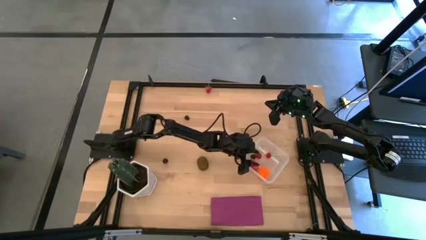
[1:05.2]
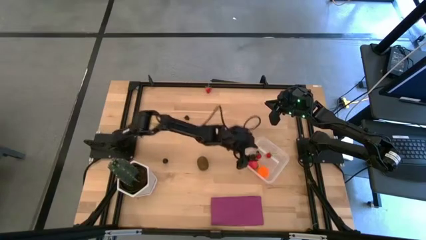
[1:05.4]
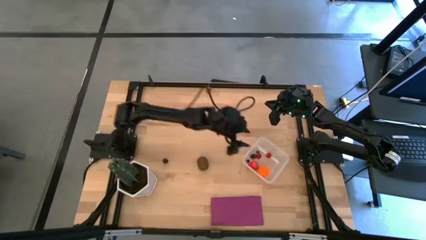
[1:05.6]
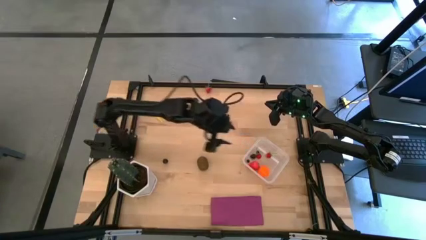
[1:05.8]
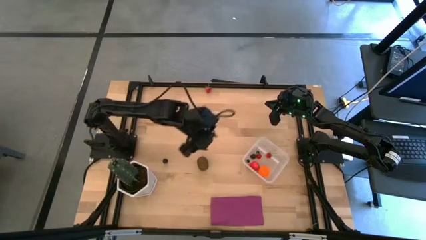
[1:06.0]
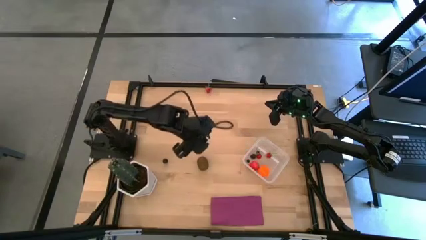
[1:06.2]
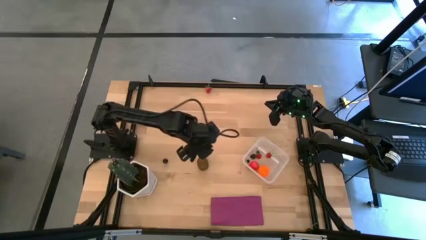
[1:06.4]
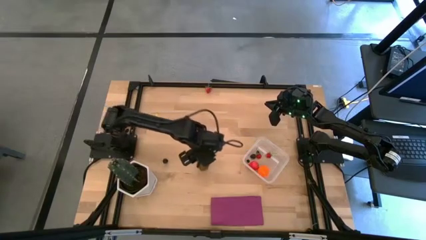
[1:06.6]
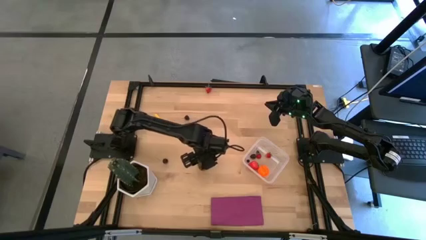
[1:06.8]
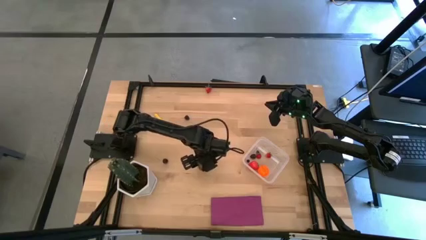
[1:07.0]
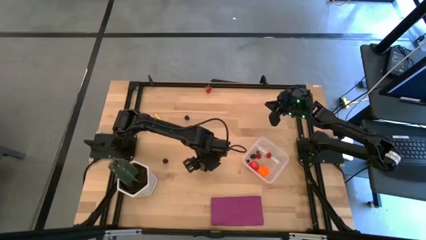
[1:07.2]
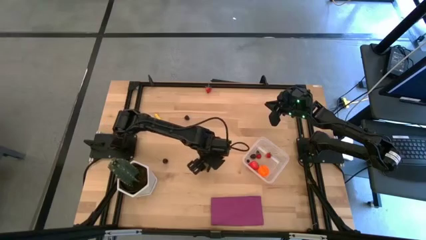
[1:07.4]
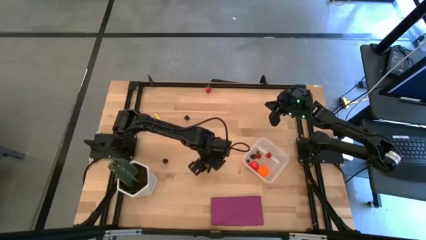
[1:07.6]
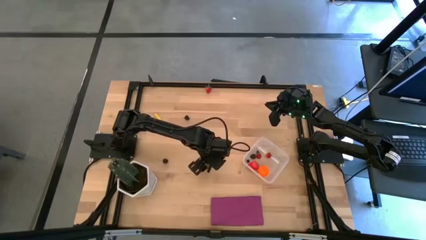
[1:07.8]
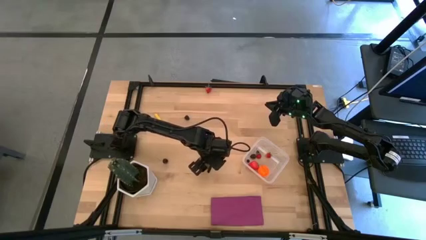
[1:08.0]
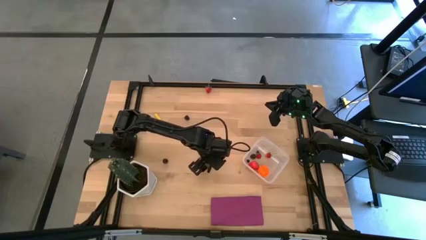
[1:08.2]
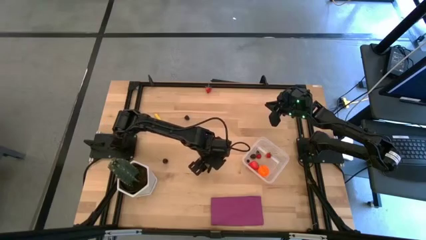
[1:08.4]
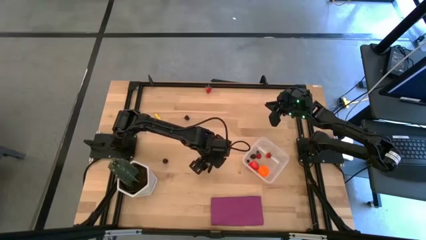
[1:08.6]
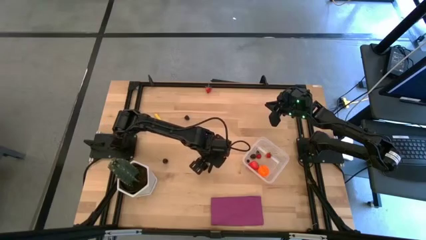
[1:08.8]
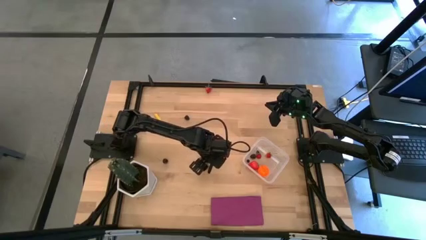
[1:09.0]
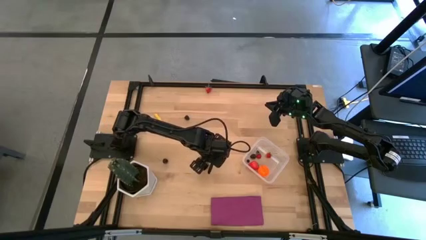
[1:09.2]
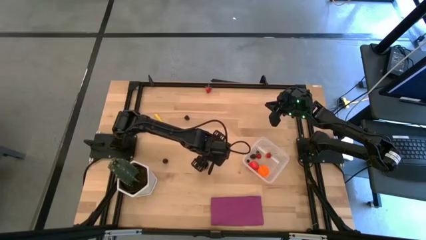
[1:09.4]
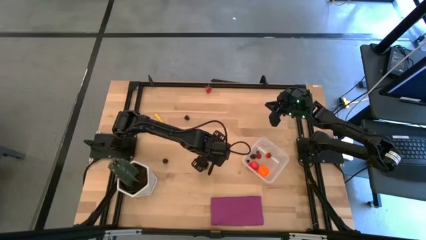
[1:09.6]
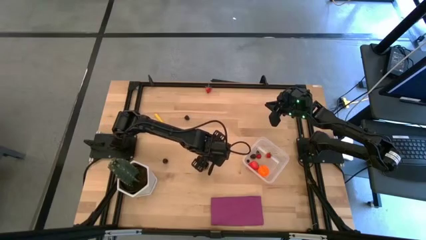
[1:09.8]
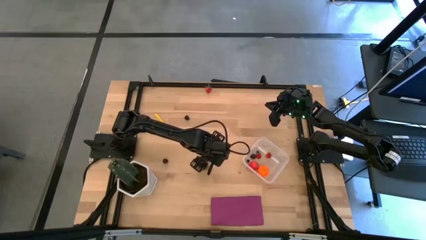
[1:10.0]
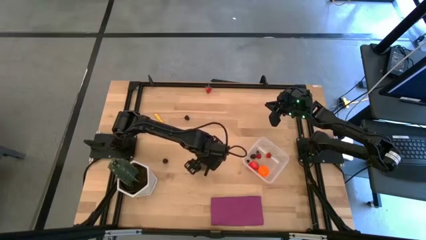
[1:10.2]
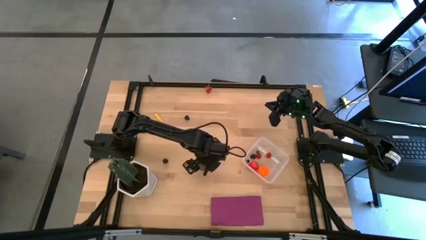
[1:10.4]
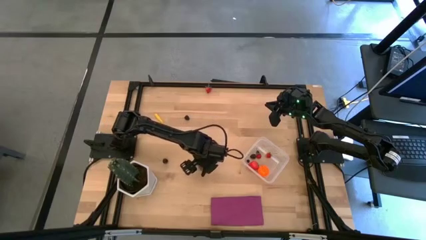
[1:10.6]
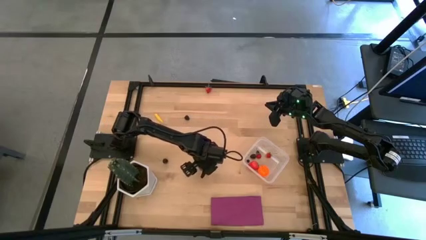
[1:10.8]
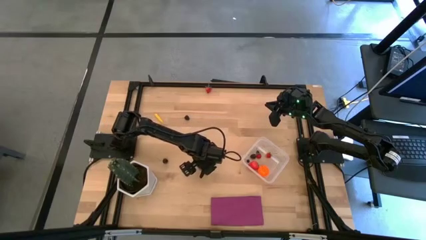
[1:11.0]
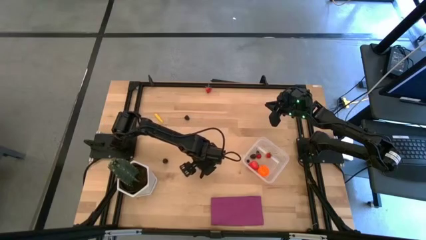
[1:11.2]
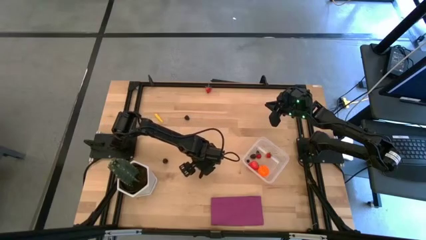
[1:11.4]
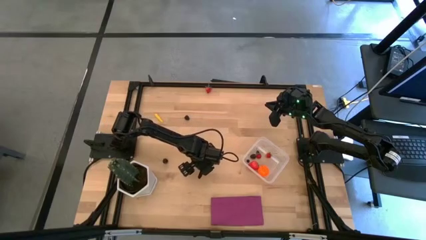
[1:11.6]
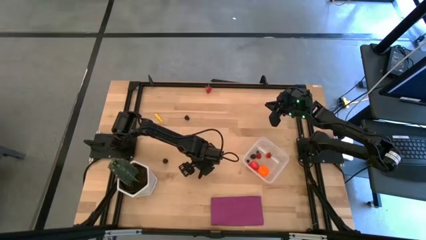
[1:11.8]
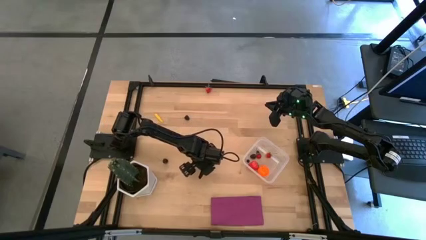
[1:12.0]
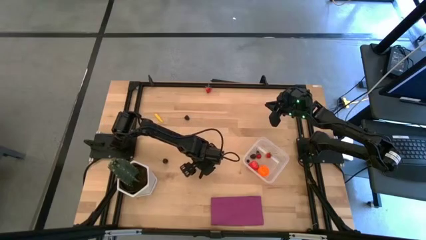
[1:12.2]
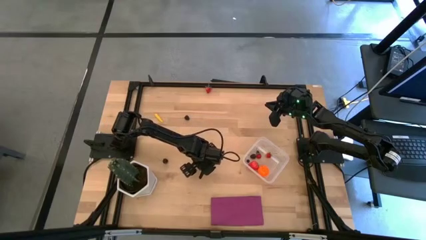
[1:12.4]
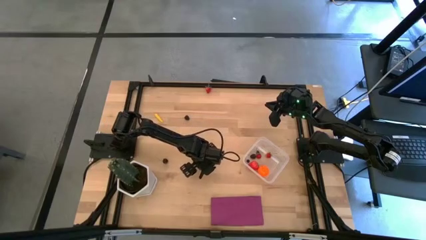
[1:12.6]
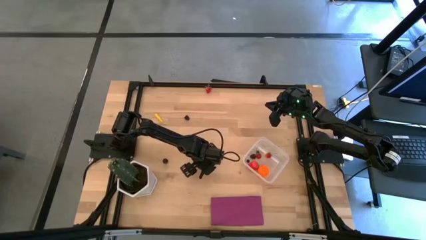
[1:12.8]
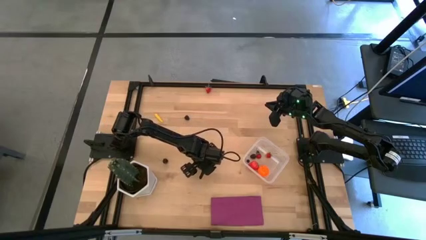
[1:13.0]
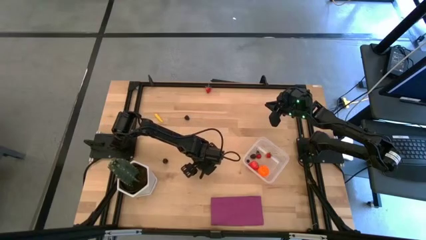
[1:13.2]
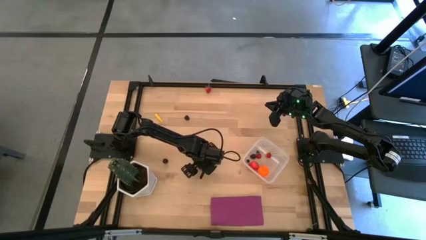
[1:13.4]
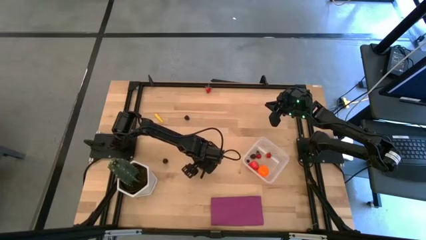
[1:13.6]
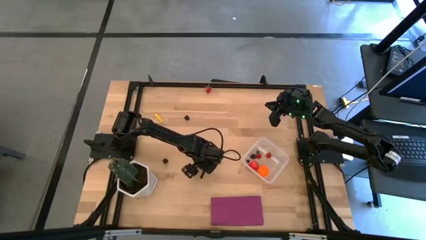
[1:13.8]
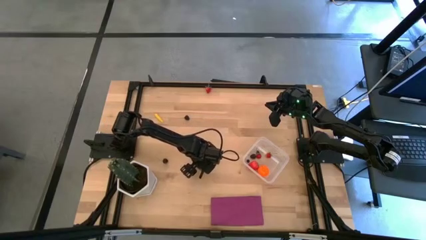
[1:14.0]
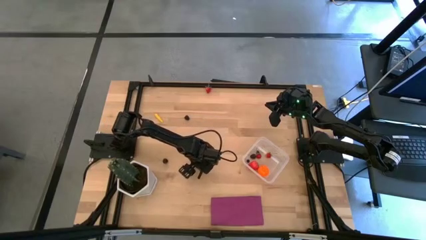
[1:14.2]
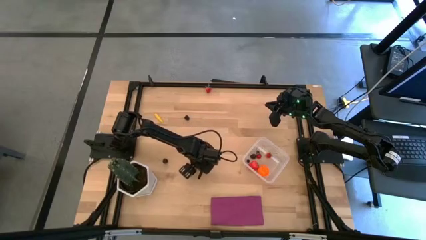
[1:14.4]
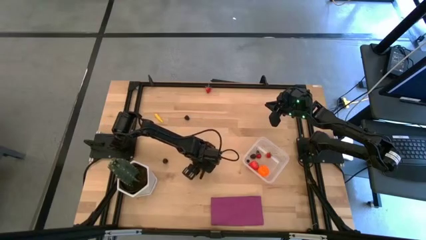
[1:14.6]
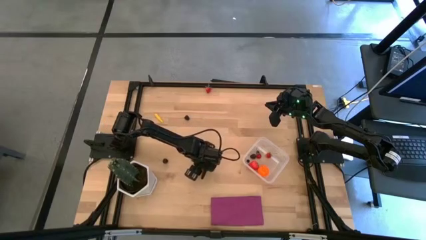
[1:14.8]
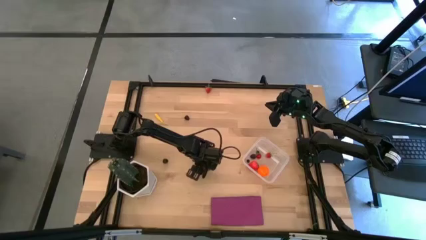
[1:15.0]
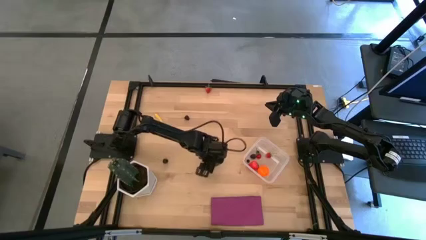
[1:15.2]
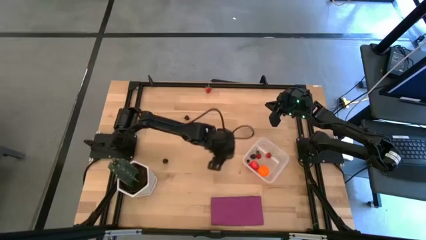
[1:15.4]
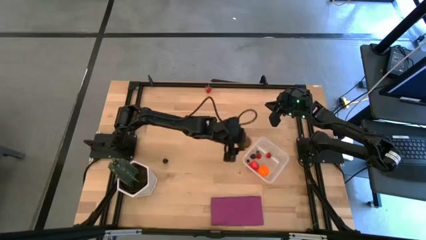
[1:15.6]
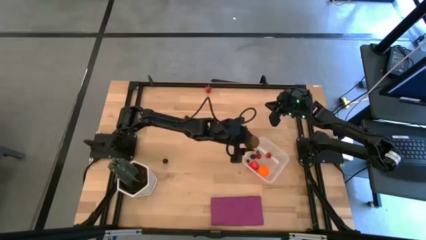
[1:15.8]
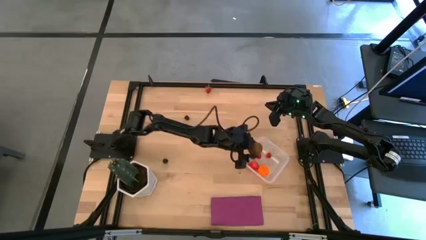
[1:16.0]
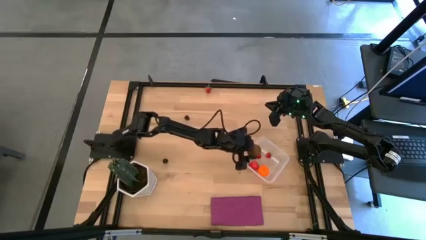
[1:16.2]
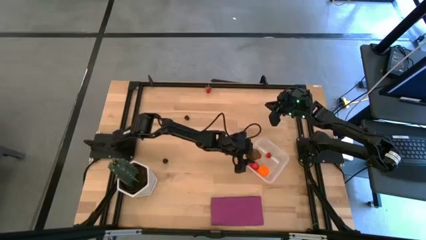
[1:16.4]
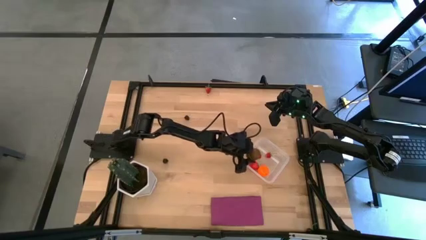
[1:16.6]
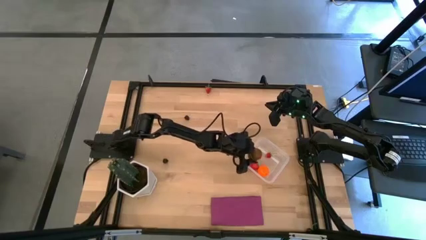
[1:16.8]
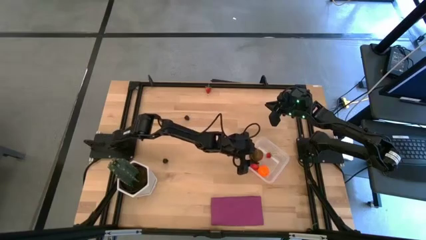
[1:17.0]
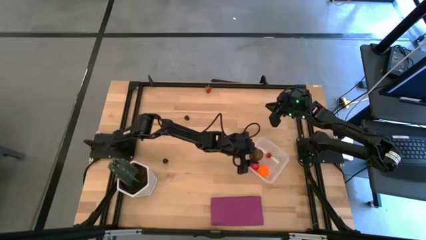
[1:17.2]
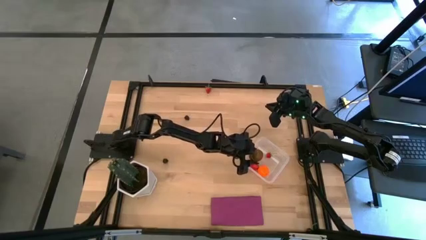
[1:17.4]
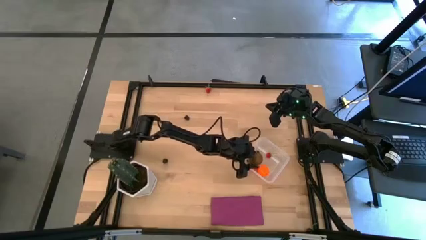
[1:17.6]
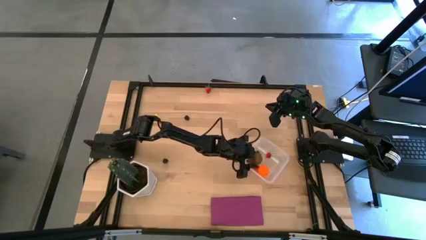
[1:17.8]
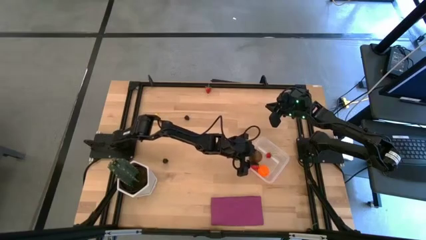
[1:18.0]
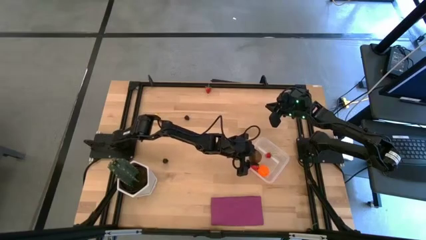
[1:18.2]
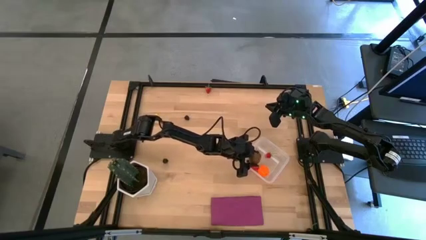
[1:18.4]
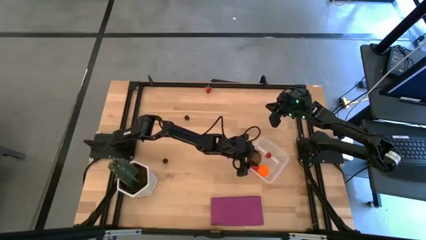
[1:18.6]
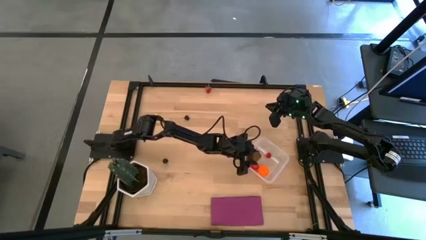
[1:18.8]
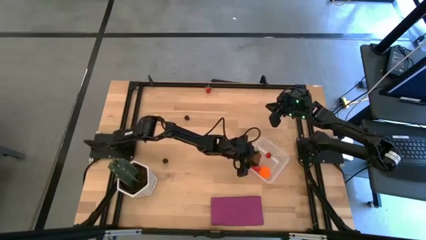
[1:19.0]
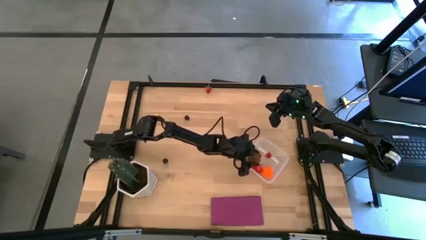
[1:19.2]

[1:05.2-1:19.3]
Task: Pick and placing Produce into tupperware
Put the kiwi into the transparent bin
